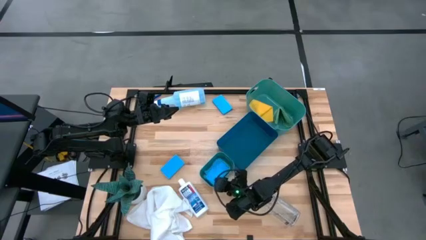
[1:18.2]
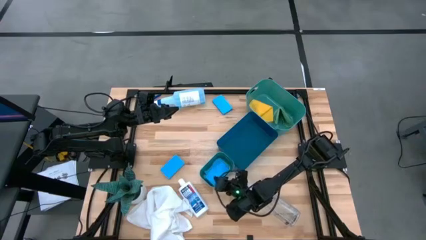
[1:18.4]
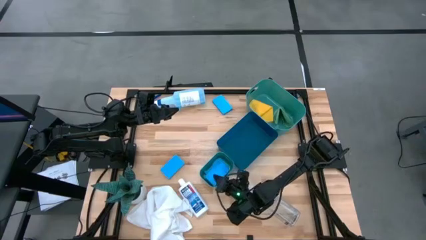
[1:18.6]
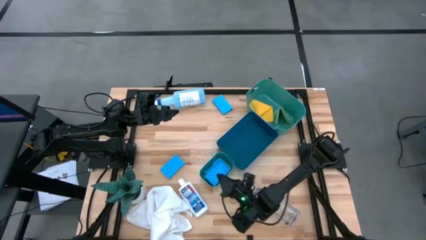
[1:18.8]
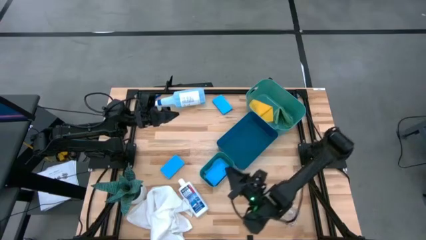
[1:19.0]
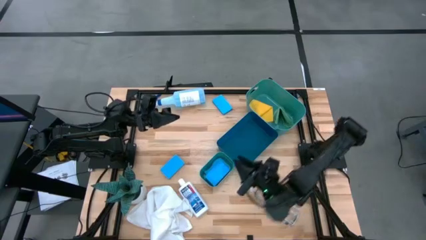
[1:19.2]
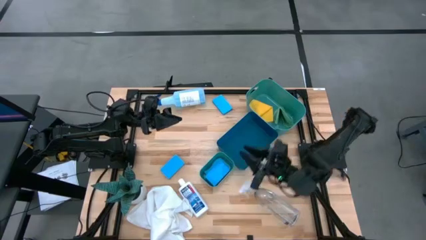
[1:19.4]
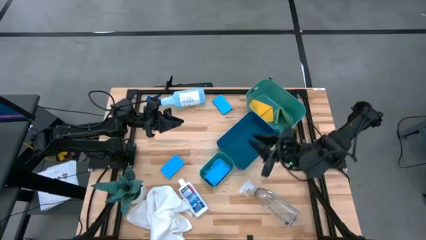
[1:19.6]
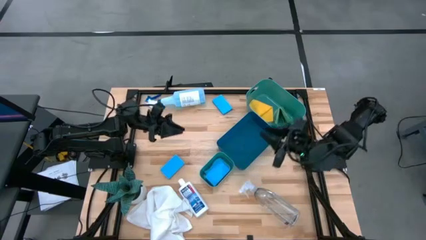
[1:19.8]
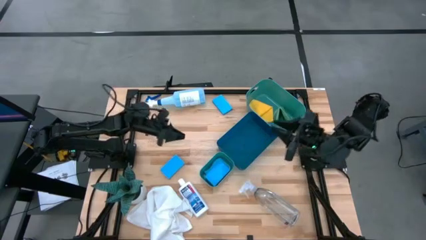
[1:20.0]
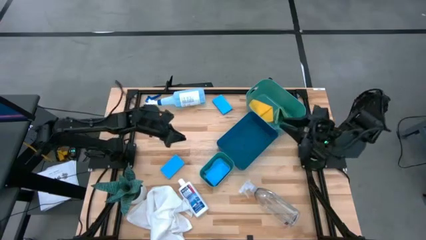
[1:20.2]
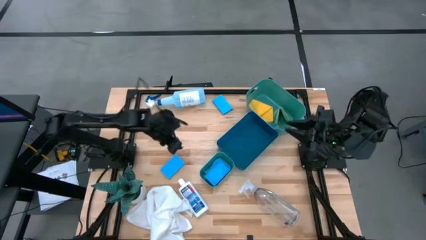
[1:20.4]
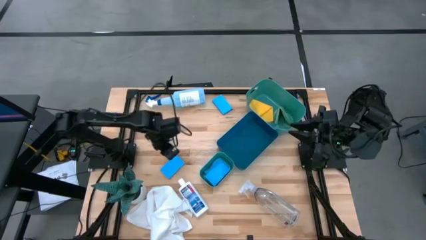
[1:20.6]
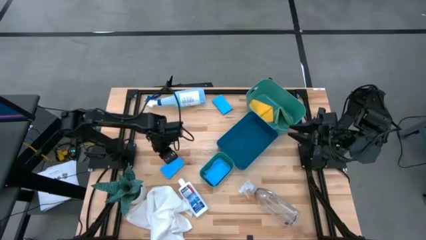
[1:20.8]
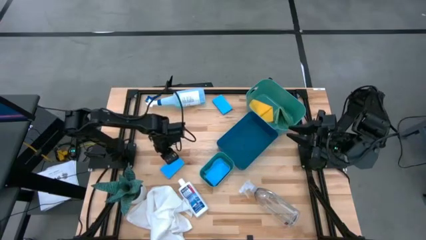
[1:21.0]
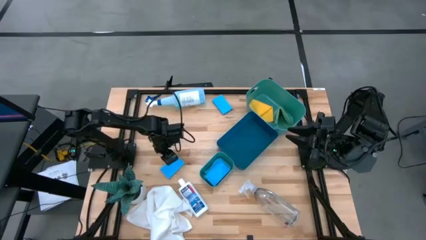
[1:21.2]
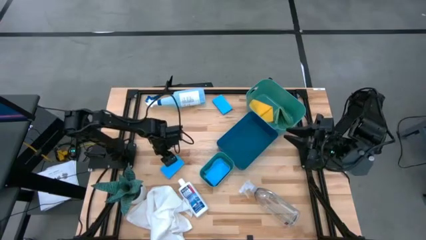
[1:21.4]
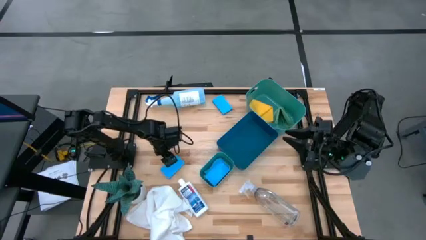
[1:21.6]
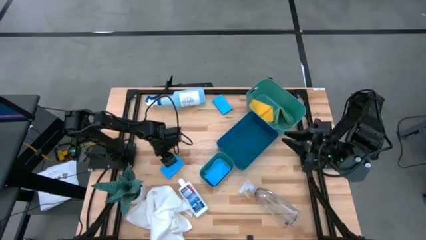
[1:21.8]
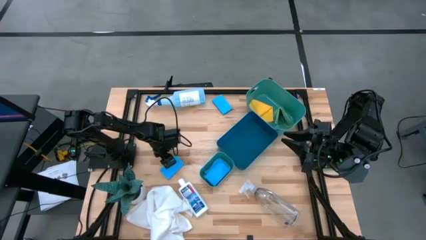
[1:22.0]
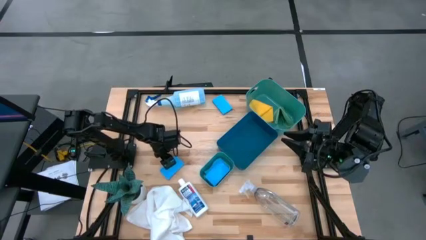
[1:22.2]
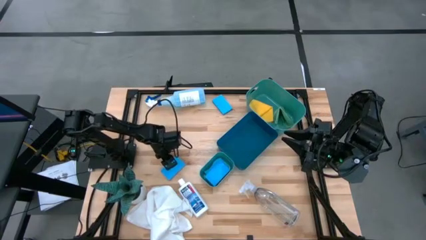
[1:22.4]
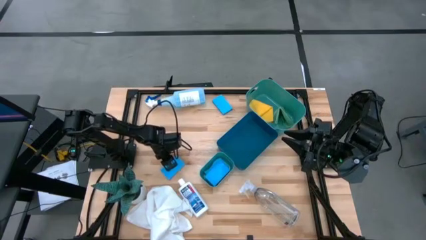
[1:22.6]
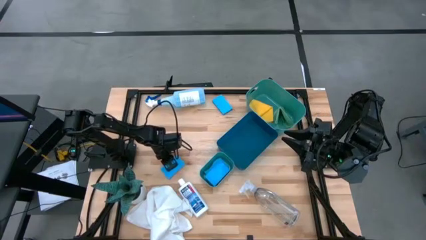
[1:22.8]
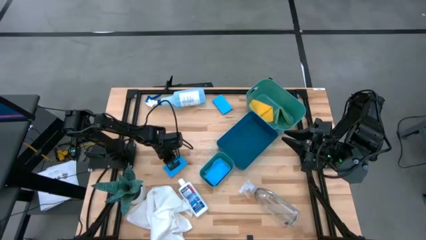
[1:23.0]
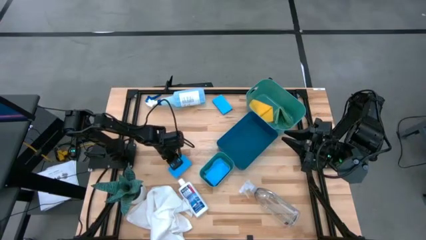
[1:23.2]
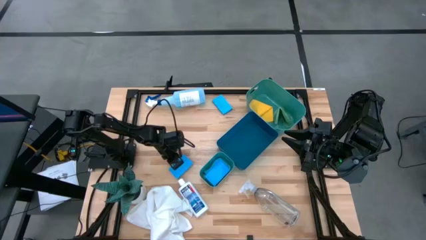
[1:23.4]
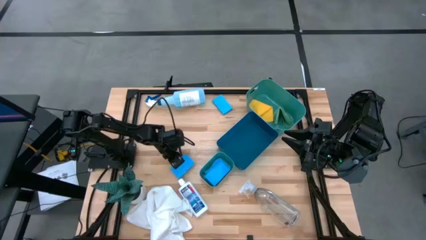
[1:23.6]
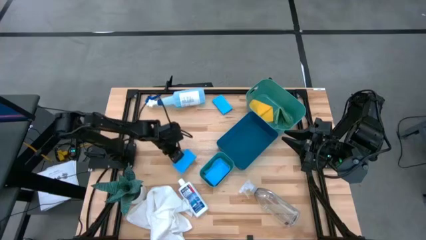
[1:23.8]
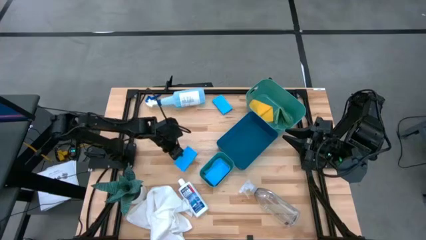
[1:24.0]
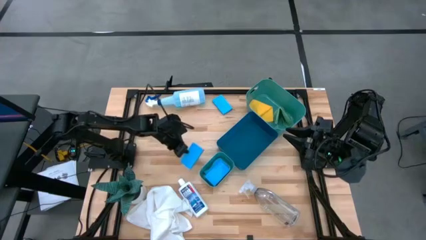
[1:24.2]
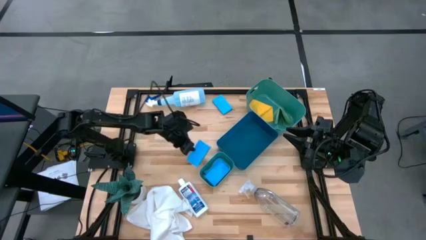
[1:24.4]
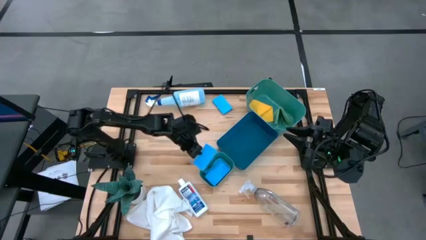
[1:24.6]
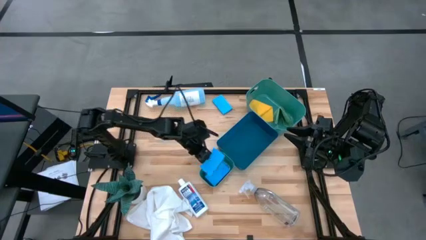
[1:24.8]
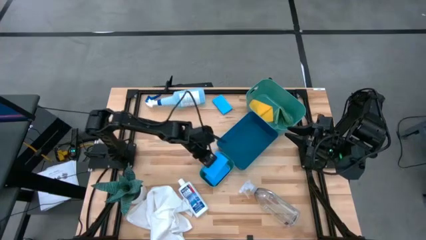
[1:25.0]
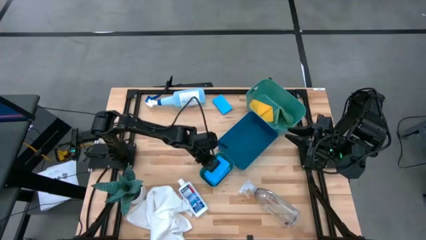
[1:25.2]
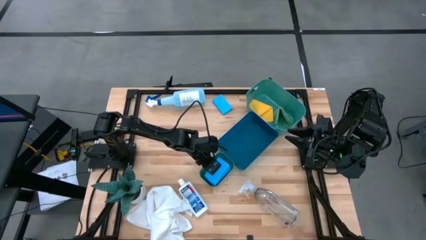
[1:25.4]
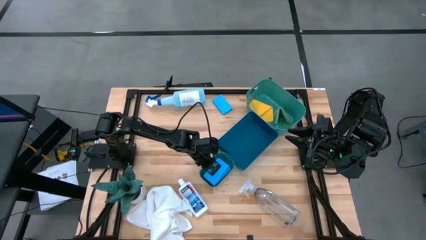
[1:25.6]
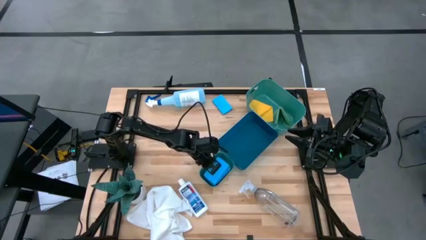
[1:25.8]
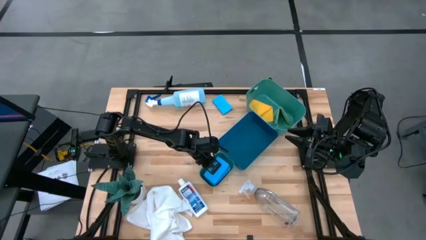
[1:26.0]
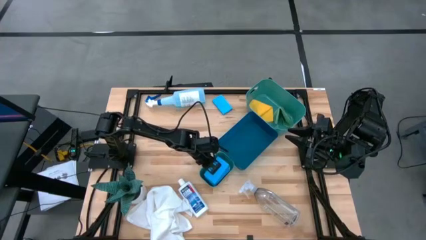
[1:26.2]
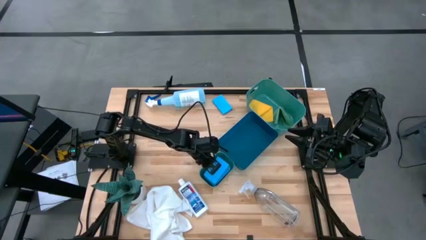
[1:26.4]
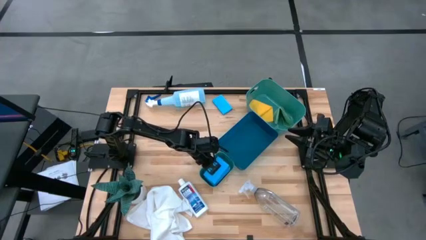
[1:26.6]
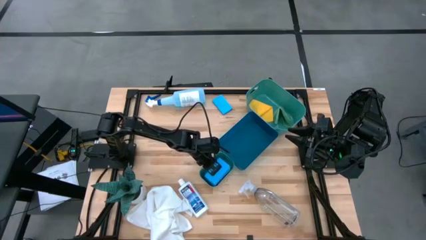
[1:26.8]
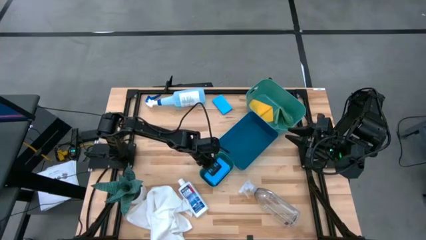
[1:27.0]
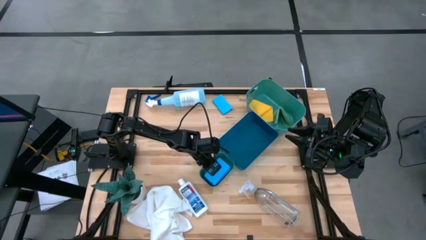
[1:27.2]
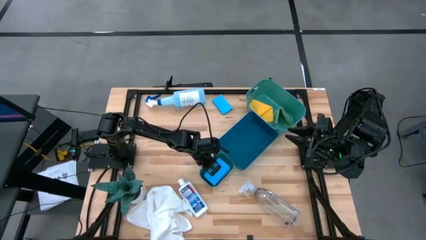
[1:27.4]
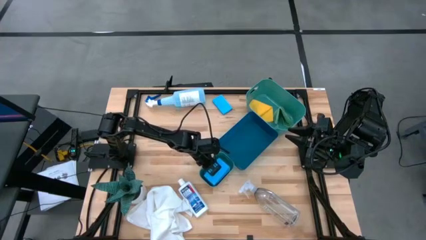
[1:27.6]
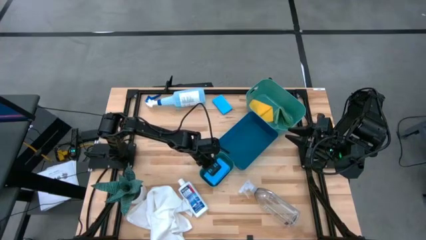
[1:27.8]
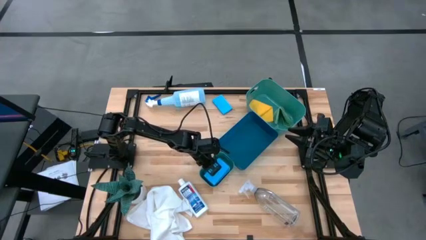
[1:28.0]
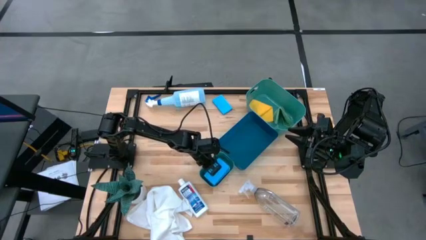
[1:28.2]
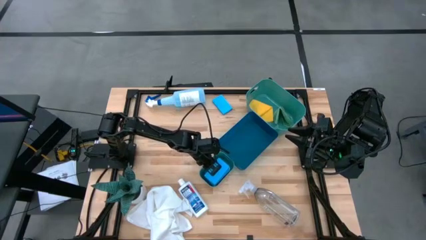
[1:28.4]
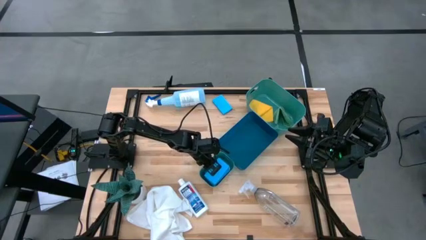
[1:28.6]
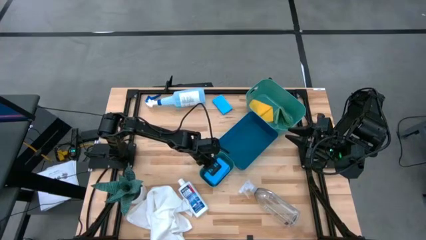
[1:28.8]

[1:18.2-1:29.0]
Task: Pick & Place Kitchen Items
Put the bottom light blue sponge into the bottom green bin

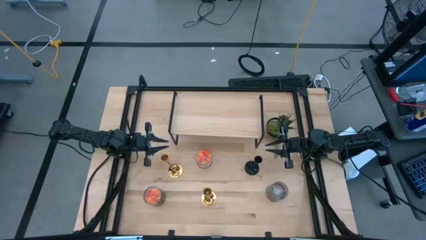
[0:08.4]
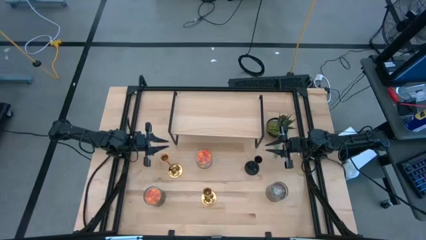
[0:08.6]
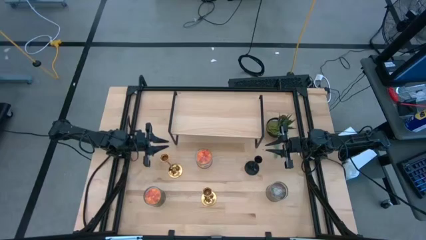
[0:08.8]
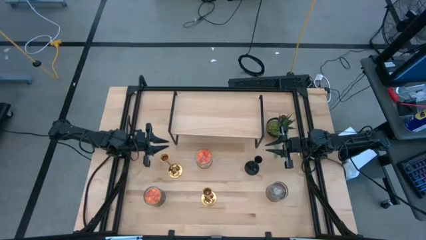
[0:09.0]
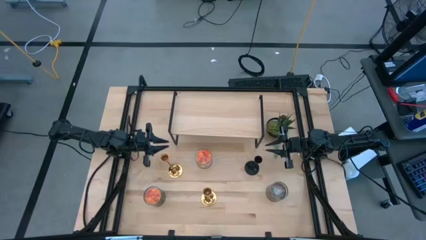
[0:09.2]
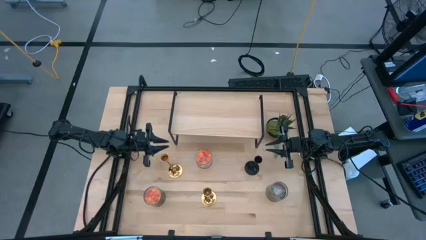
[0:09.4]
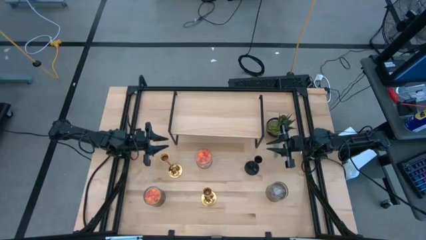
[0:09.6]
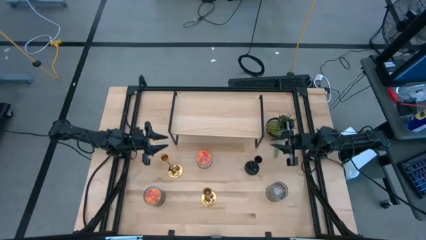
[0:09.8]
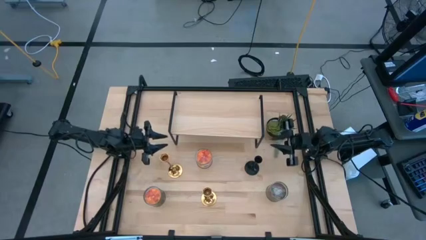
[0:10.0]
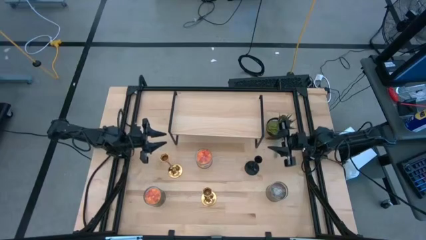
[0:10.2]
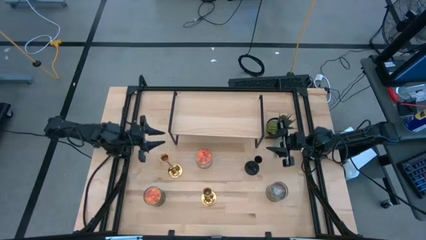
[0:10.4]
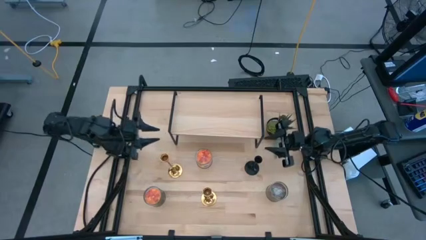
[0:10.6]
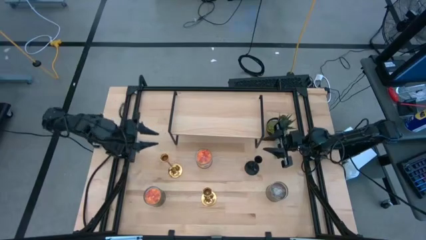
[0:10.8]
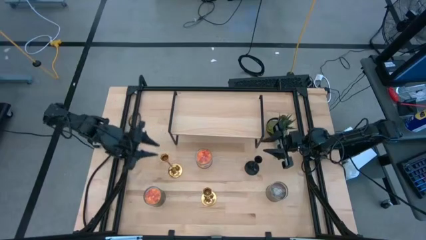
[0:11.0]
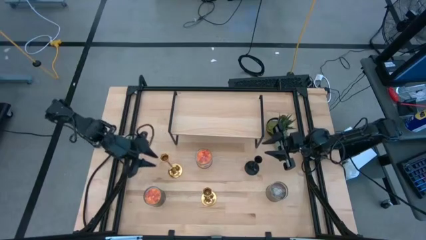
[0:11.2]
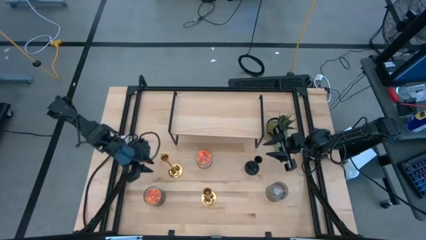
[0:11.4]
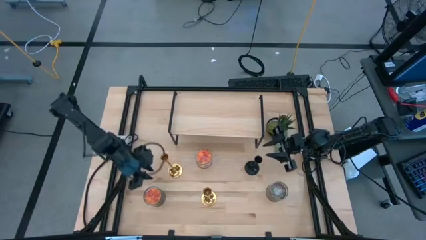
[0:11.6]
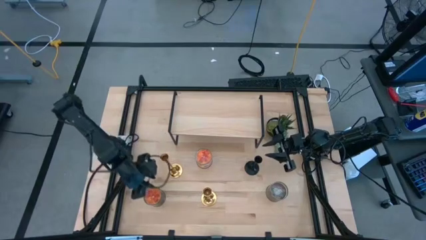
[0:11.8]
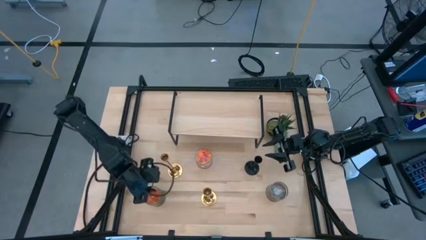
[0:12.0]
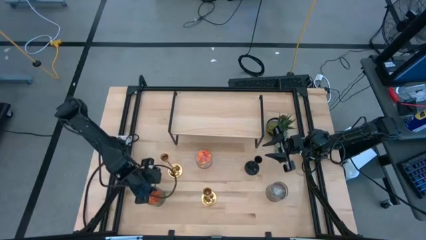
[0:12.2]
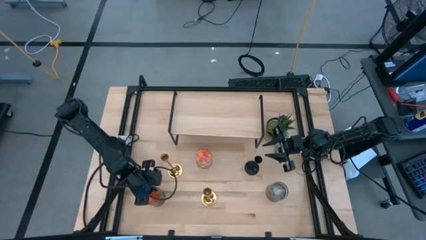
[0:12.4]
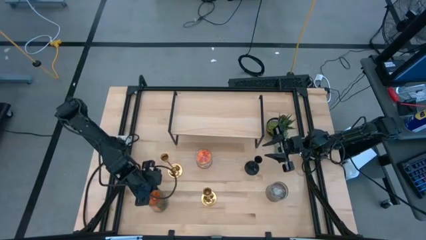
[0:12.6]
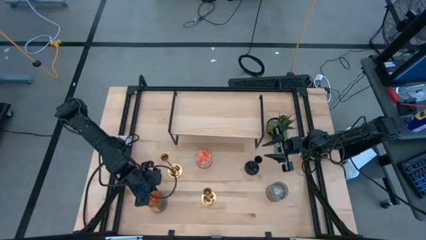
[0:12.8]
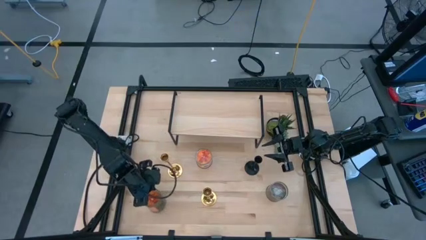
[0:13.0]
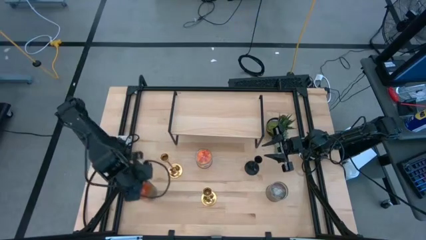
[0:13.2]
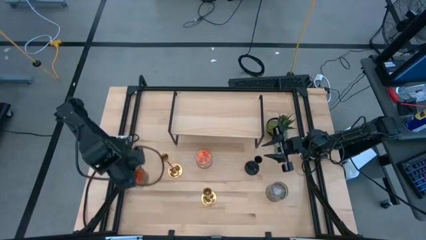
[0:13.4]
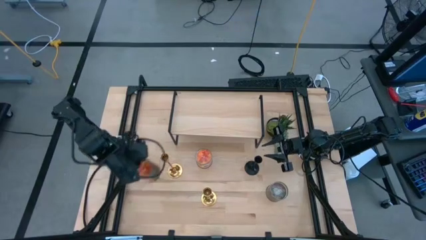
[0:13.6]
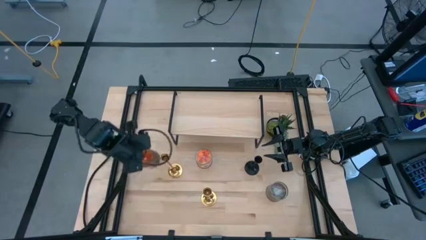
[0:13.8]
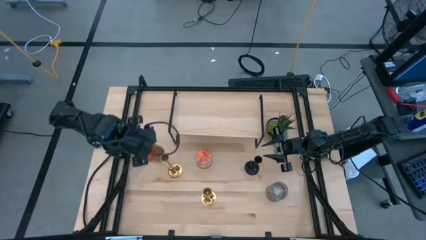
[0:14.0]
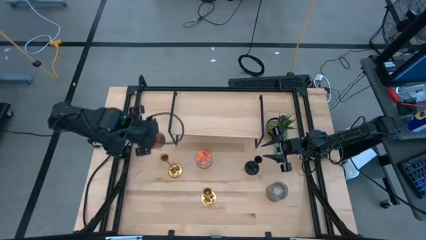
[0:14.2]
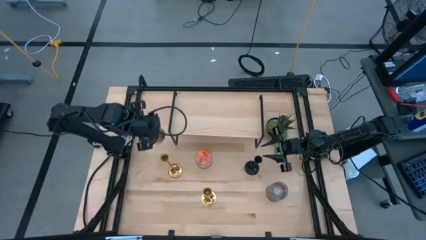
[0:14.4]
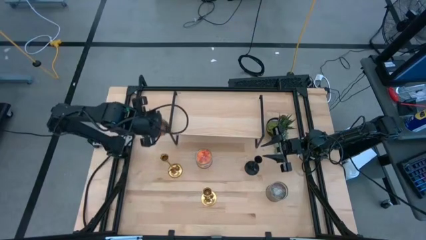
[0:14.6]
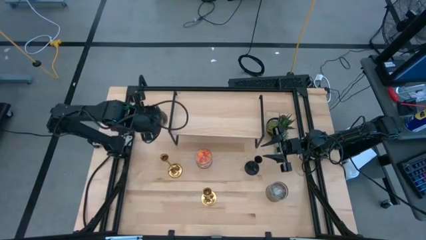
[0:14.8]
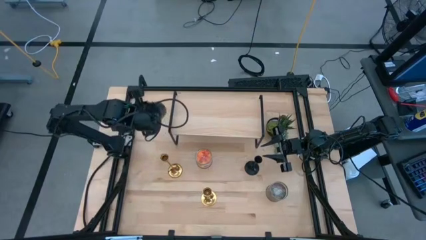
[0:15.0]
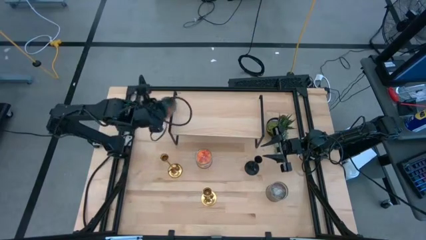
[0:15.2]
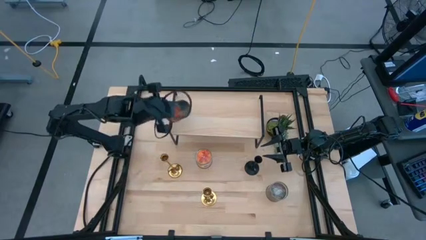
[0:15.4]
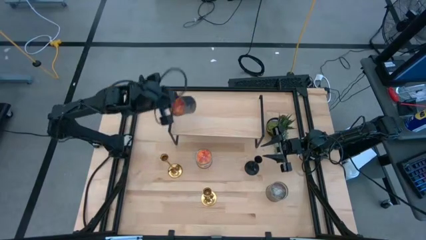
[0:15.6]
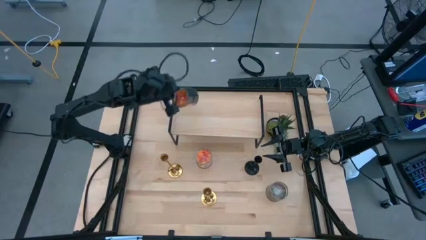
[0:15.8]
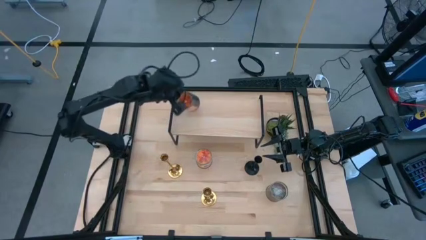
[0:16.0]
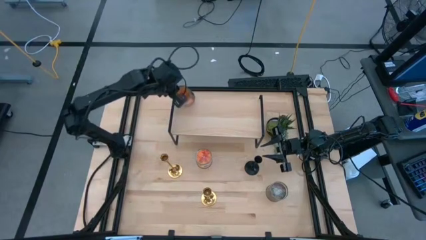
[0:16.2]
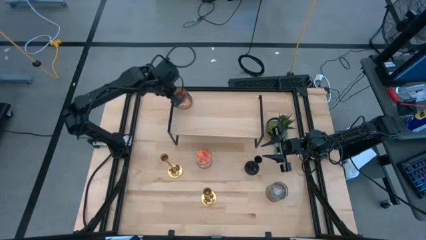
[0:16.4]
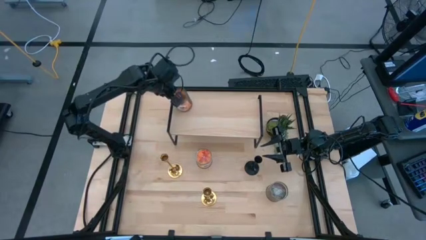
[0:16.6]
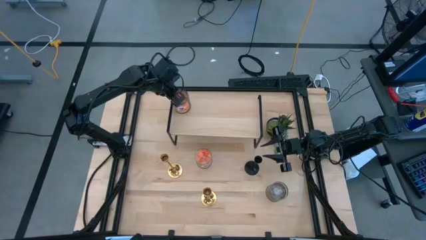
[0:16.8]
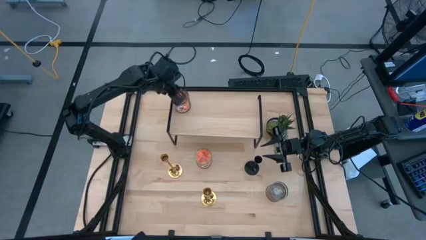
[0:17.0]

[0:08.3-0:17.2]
Task: Pick & Place candle stick holders
Put the bottom orange scented candle on the shelf
